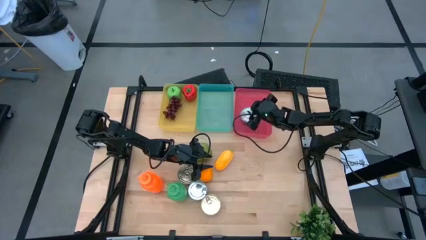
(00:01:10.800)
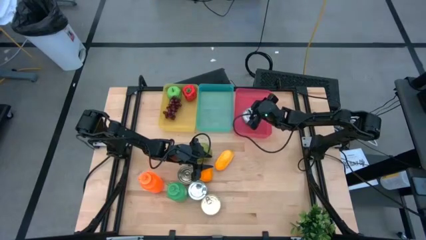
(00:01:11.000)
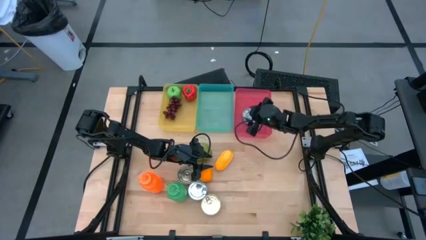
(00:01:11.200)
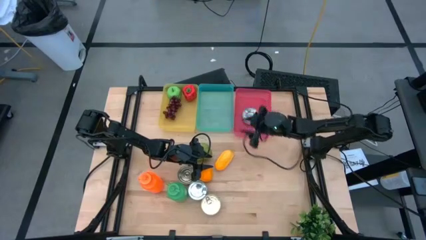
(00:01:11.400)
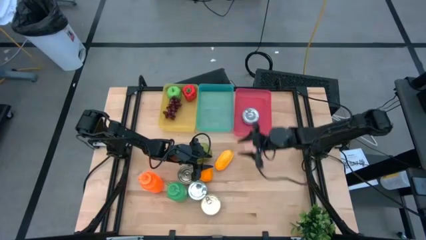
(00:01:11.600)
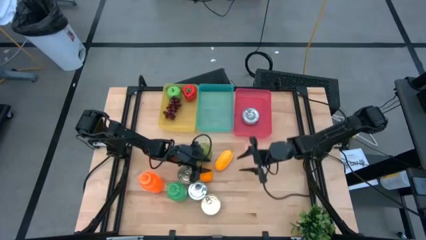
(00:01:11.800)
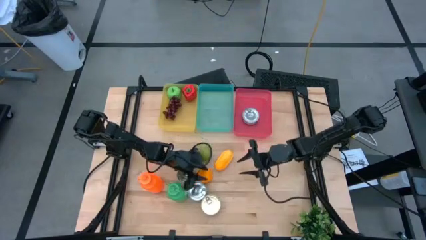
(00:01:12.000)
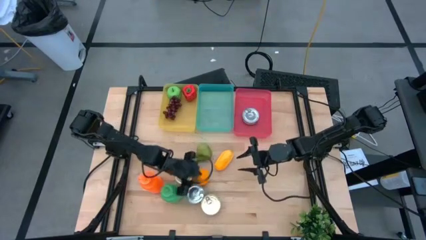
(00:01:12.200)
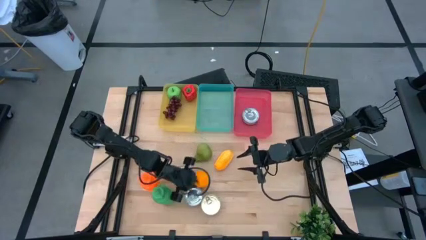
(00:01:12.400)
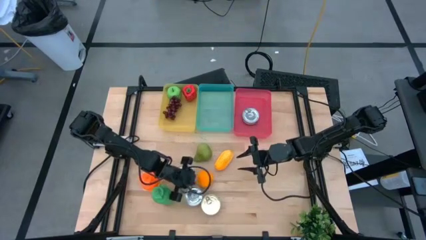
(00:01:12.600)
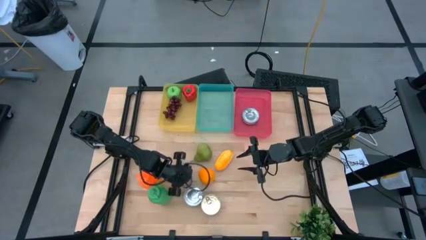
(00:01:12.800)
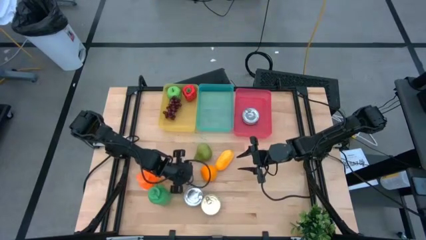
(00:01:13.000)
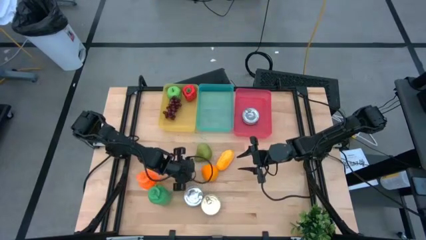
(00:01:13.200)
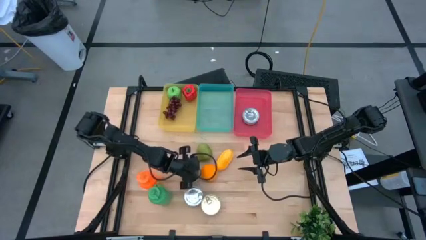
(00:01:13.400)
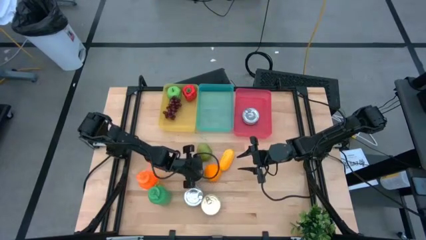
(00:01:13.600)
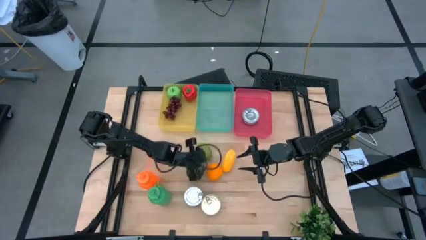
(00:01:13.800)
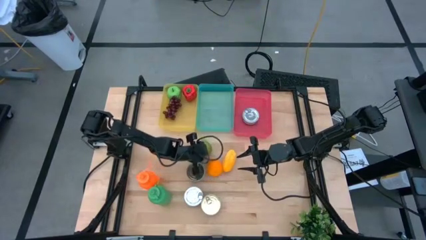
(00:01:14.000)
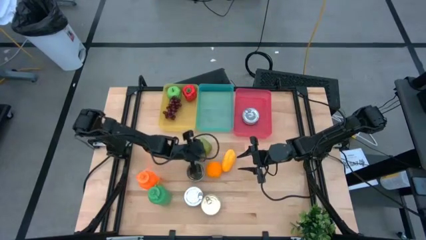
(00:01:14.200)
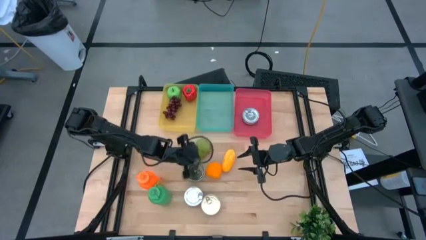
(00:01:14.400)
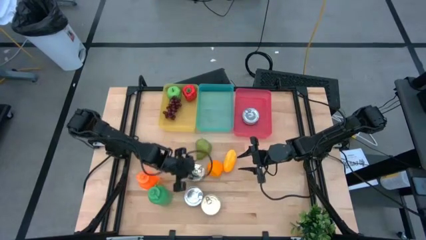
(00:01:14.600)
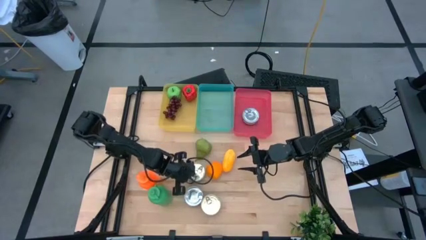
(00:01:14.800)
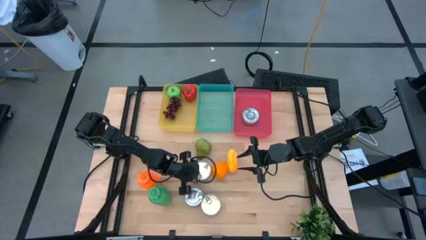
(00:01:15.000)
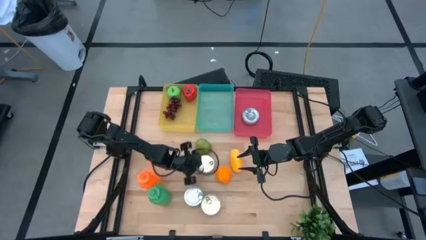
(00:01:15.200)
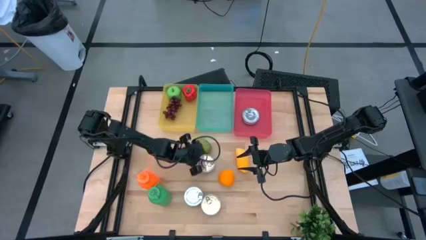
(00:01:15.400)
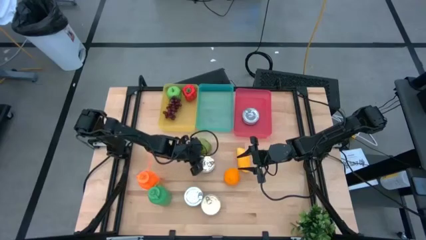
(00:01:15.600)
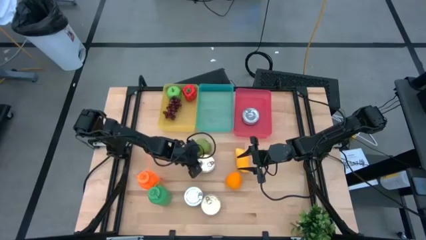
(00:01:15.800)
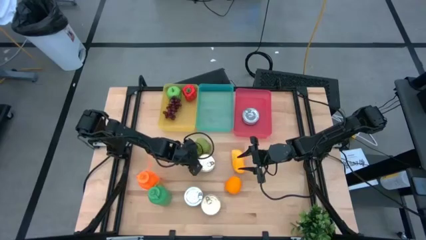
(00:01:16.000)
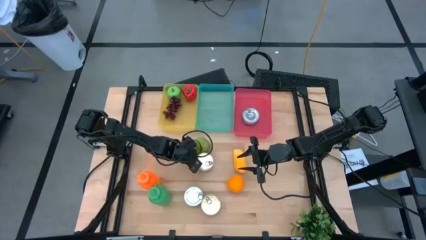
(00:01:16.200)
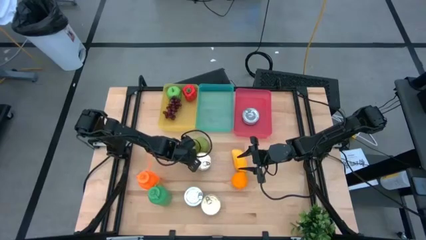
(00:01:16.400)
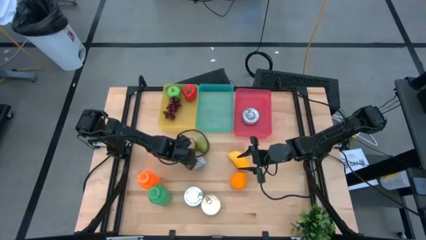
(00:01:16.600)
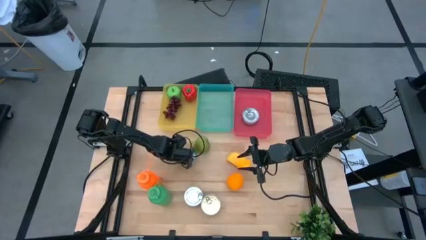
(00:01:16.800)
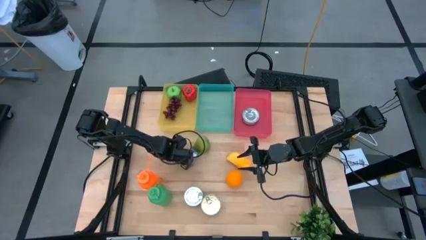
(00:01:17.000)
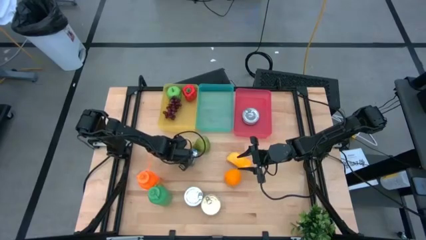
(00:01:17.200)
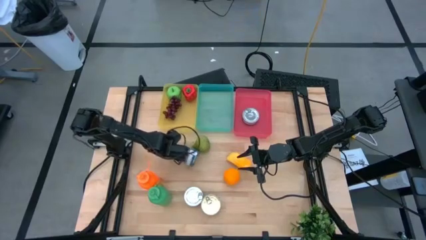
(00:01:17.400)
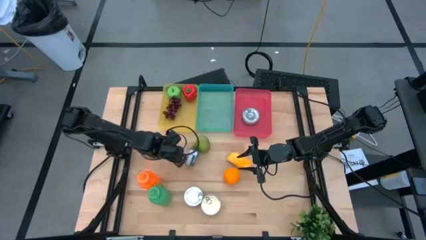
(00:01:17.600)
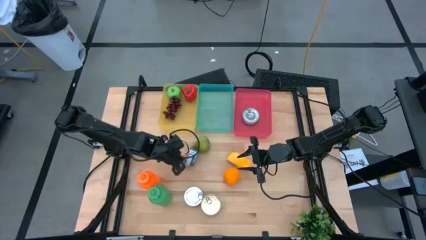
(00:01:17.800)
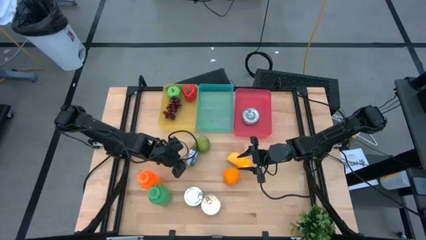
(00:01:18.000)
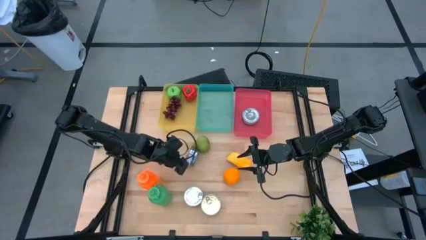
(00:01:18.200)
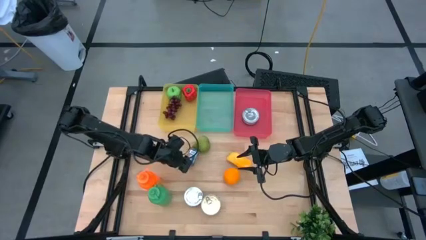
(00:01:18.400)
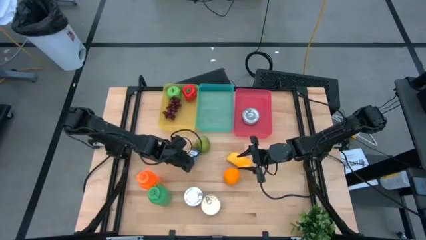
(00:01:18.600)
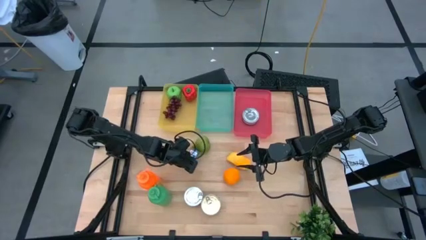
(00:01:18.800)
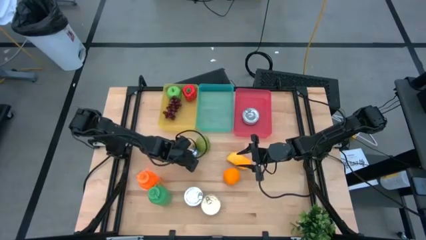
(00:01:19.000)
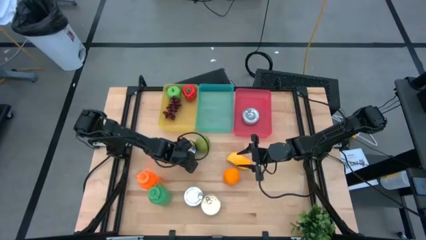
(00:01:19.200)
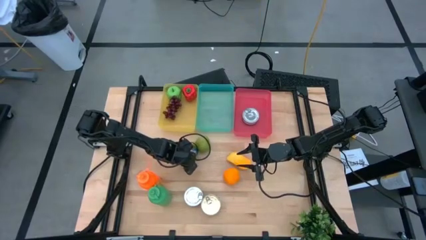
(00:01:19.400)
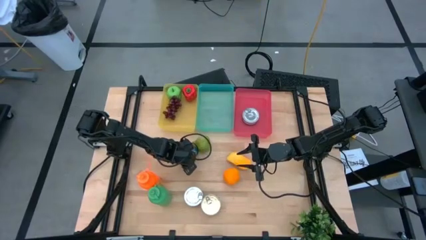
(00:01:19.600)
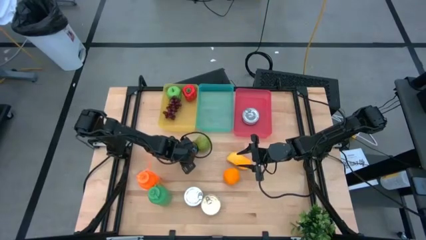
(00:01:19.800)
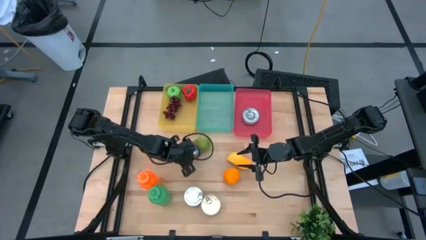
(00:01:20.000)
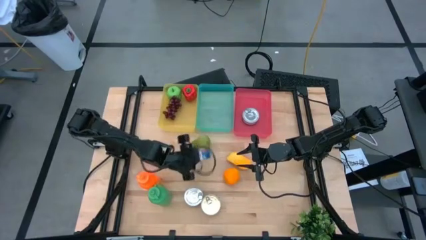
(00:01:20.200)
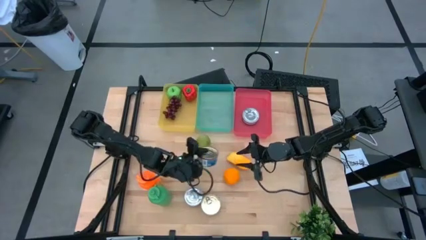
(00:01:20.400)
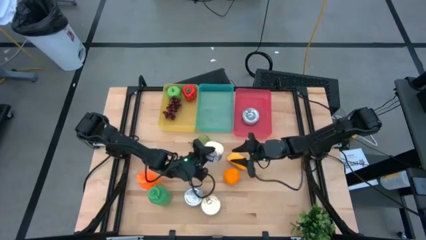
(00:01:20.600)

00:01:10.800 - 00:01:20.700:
Task: Pick & Place Food Item
Put the top blue pink tuna can into the red bin
